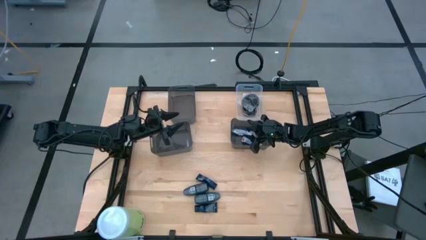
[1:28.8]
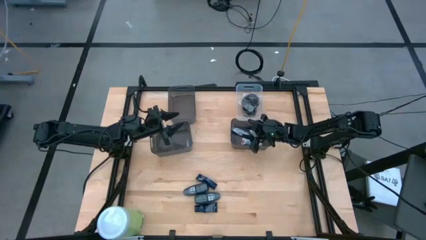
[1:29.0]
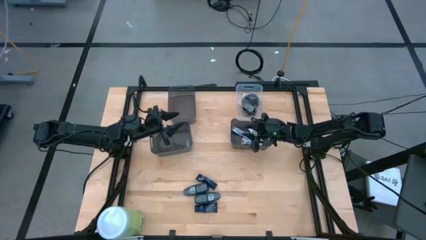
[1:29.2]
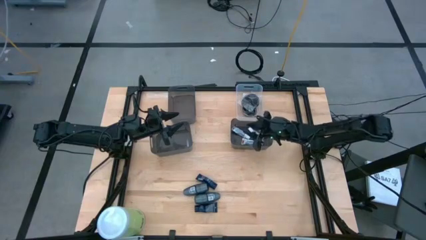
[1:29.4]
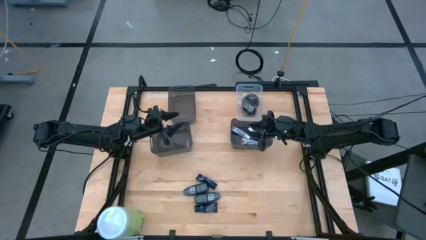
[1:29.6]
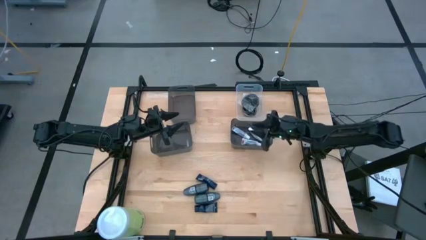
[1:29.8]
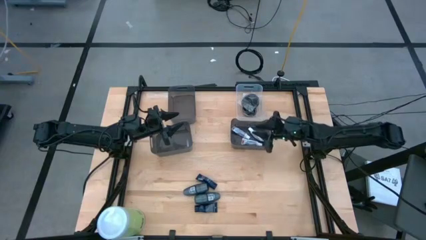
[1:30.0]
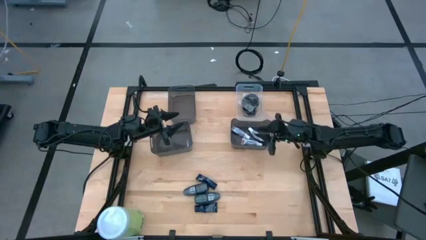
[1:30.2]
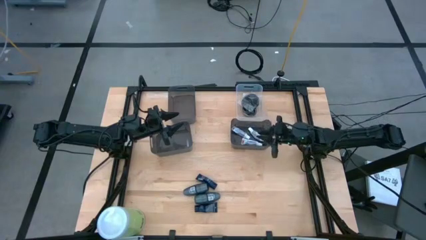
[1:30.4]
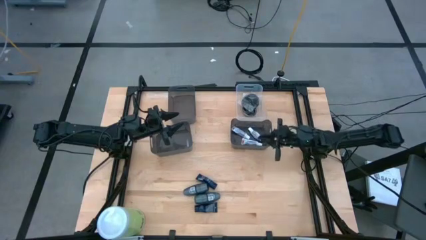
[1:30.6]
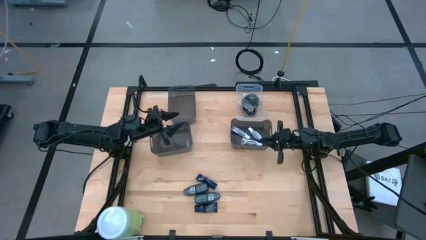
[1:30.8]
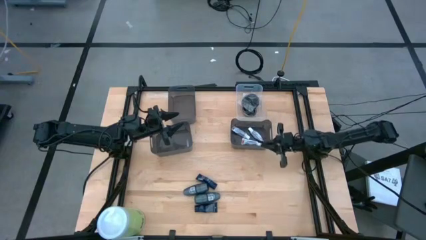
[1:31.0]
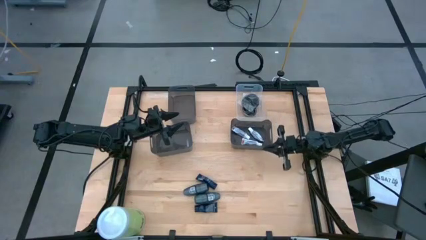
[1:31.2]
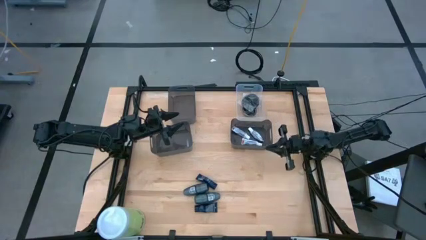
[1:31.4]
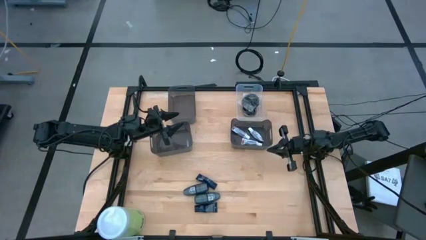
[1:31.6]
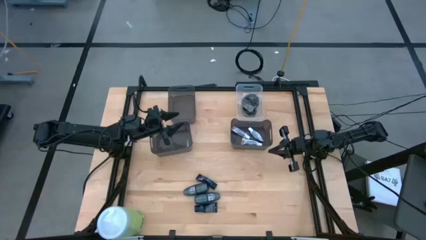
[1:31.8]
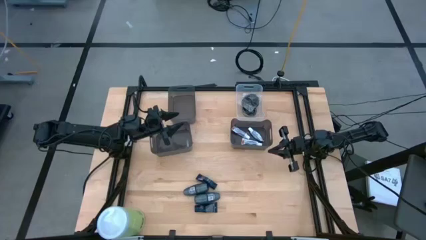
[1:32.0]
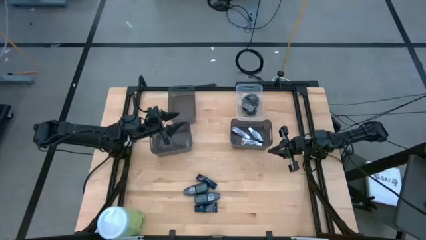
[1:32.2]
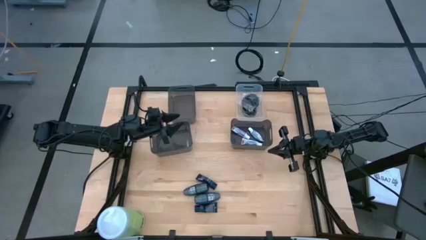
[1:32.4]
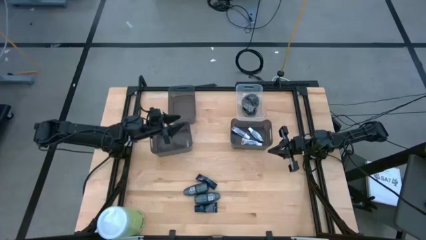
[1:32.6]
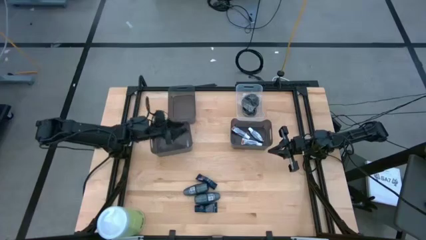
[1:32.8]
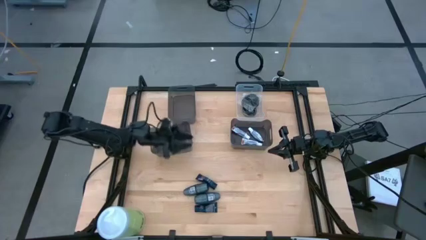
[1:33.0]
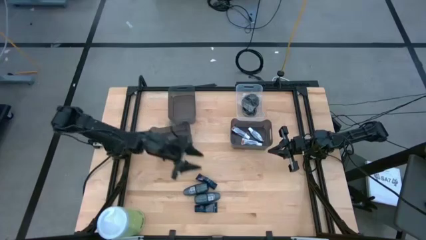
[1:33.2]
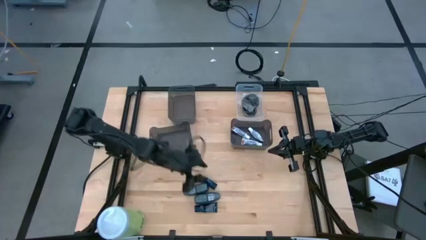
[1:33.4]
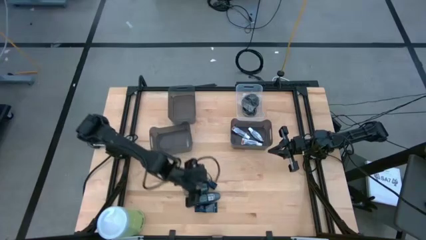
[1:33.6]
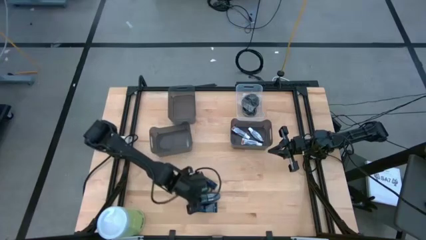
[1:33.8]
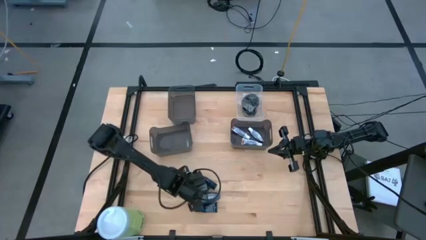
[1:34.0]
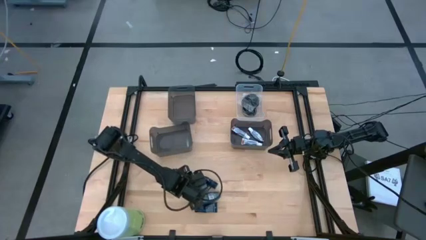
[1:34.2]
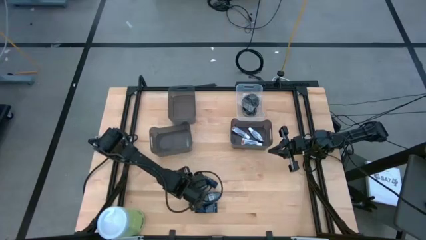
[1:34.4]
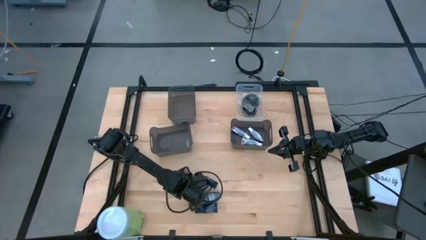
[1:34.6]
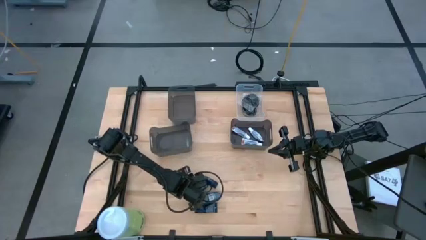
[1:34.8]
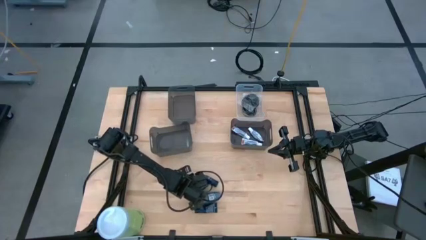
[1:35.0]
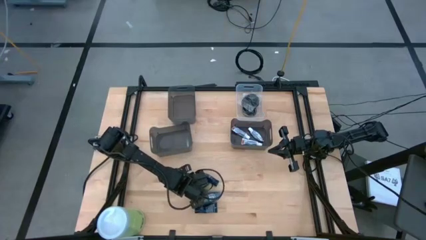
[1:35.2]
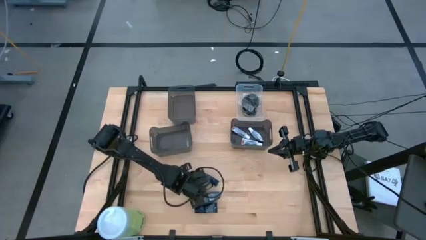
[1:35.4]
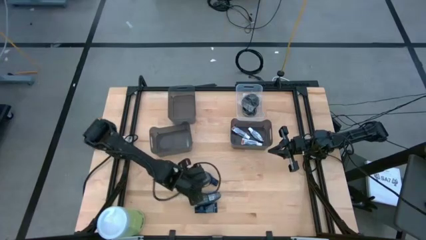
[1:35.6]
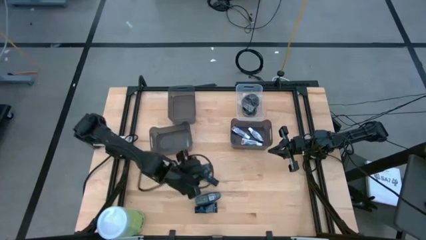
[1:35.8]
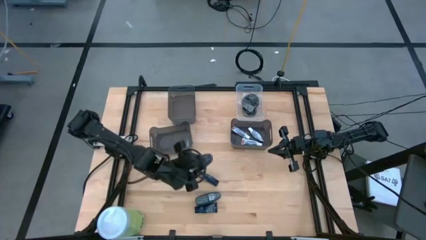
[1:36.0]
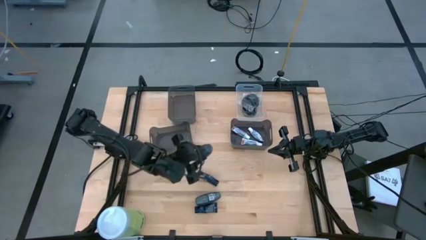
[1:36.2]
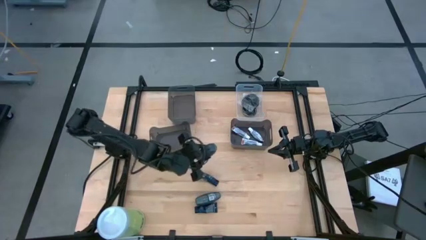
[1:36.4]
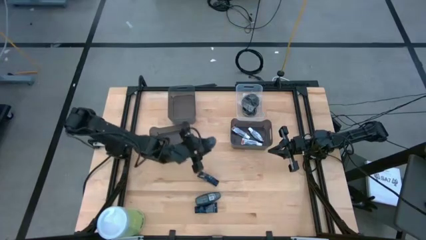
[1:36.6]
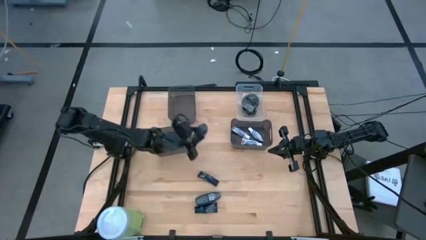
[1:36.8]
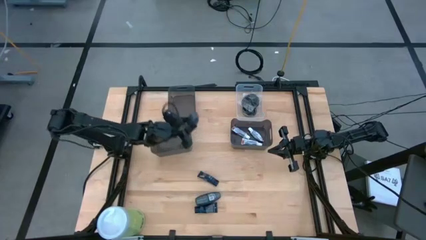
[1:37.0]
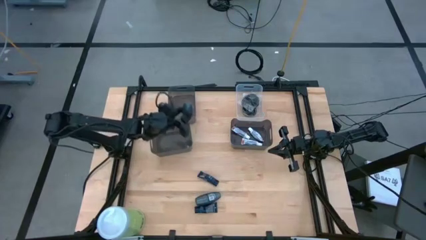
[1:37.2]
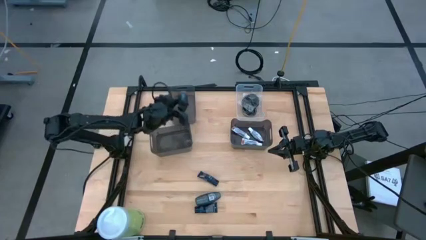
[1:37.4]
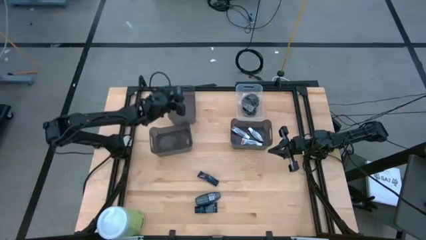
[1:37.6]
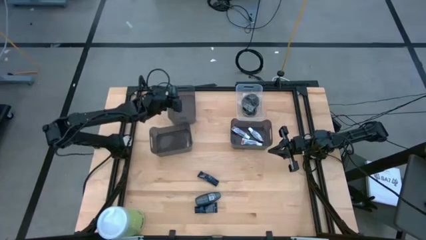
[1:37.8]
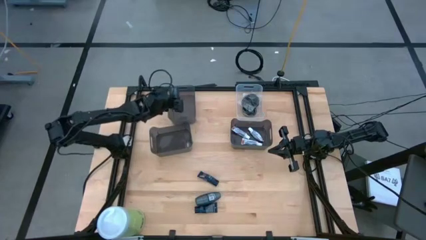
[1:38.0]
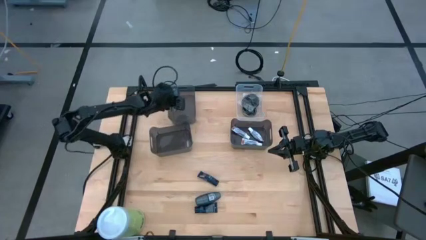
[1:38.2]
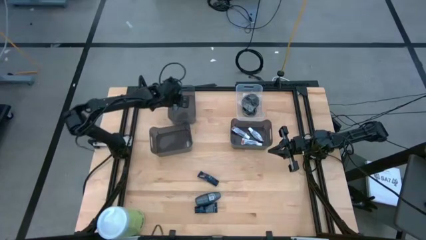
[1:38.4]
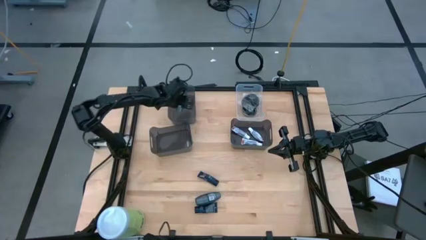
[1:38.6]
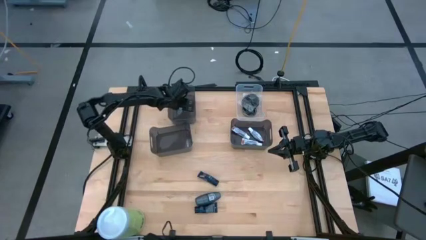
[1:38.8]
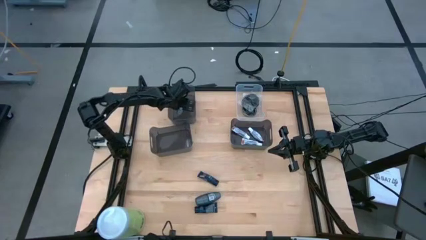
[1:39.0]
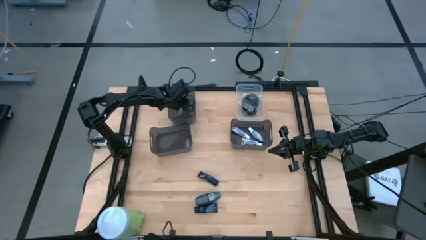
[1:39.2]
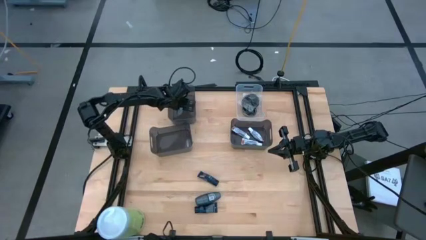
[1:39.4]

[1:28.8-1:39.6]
Task: Pick & Place Travel size toiletries
Put the top gray deodorant into the top black bin

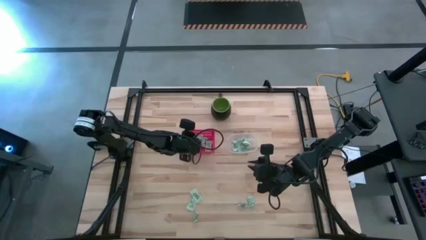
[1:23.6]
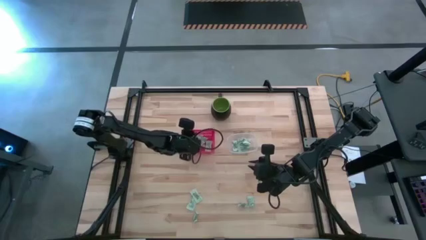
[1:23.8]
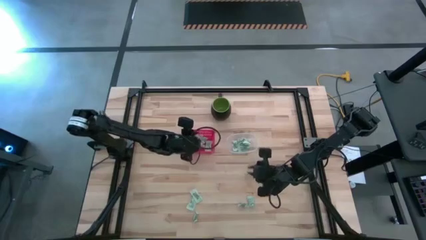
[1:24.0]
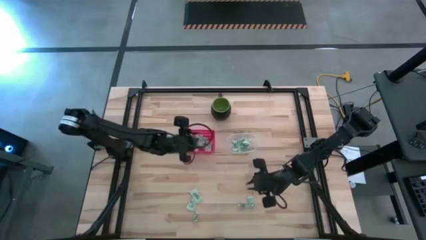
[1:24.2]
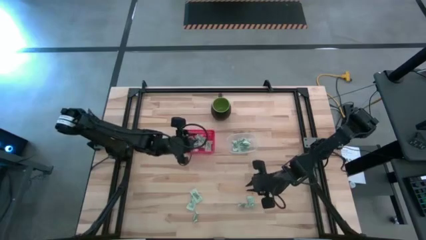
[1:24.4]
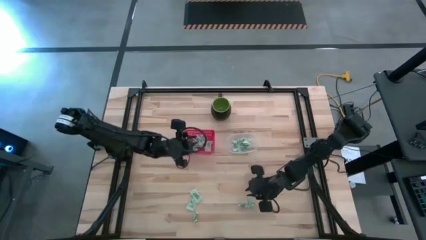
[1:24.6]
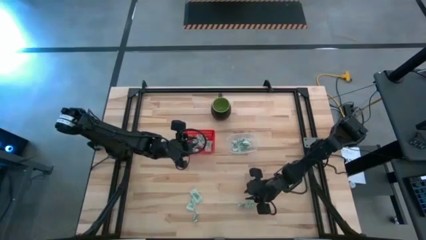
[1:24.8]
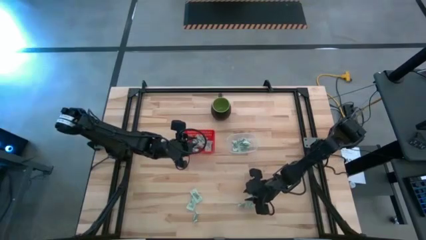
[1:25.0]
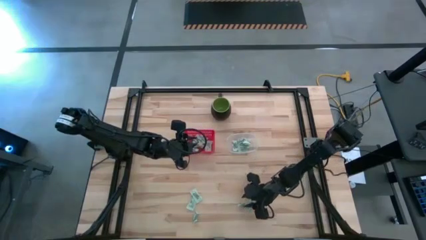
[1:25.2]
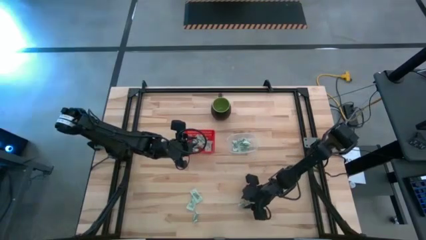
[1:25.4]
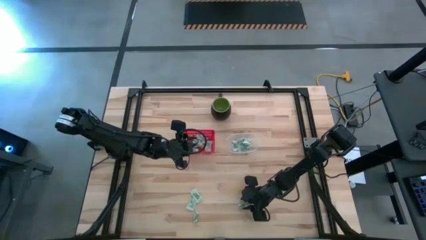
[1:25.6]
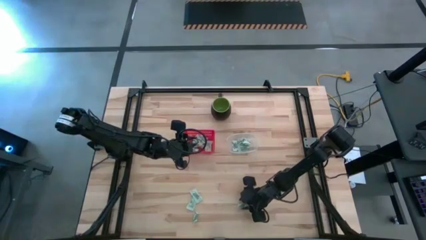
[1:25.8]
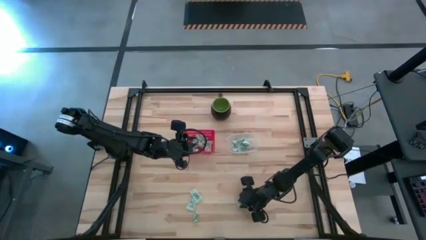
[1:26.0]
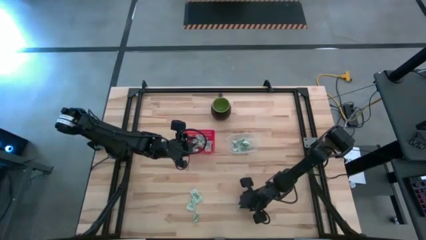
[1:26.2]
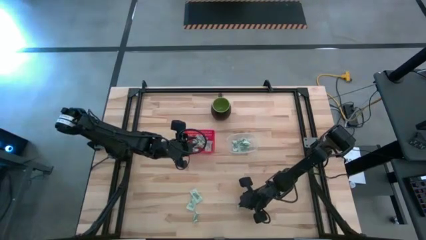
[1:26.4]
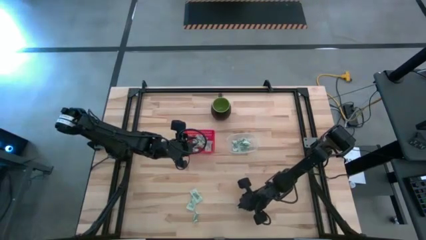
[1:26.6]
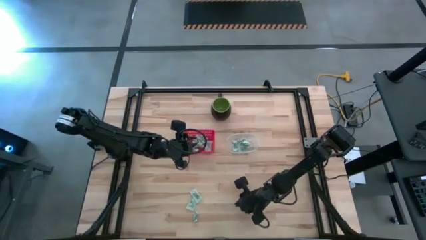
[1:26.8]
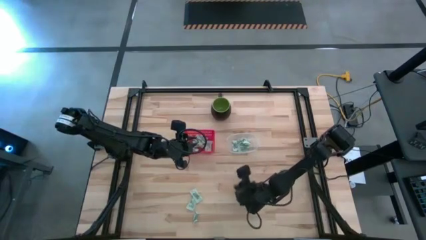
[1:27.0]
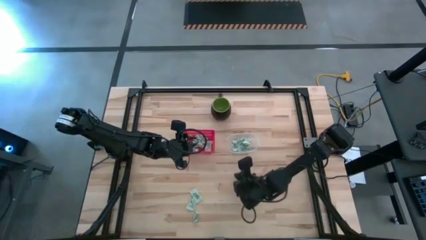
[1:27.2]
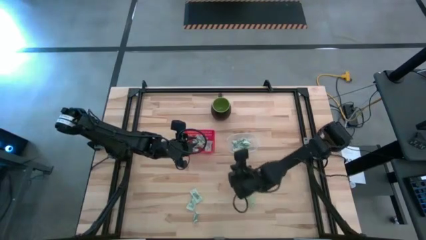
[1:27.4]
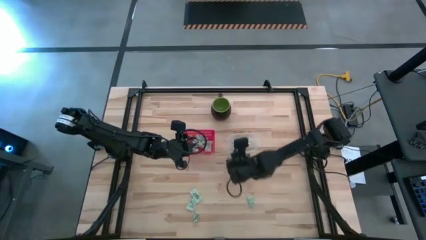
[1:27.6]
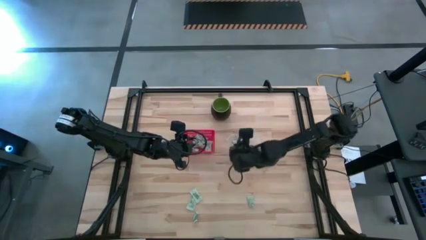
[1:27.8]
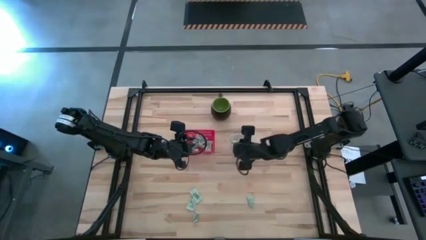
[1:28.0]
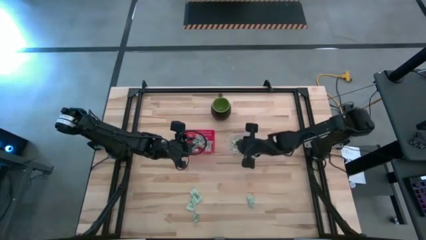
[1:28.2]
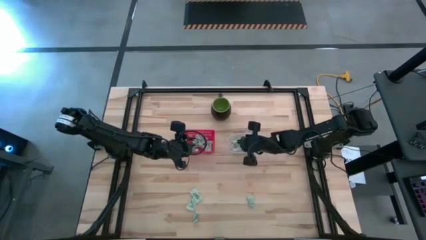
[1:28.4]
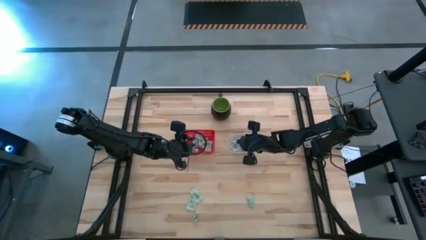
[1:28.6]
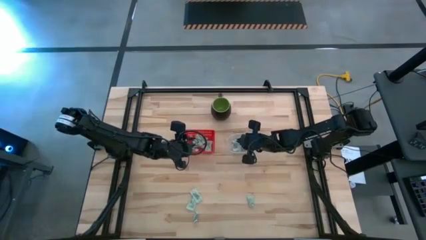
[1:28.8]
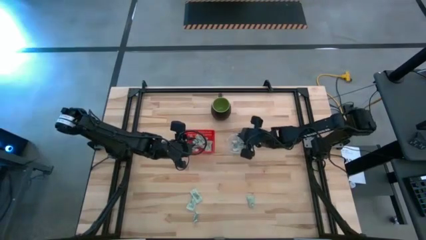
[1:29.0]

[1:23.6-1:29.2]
Task: Pick and place items into bin
Put the stevia packet into the transparent bin
